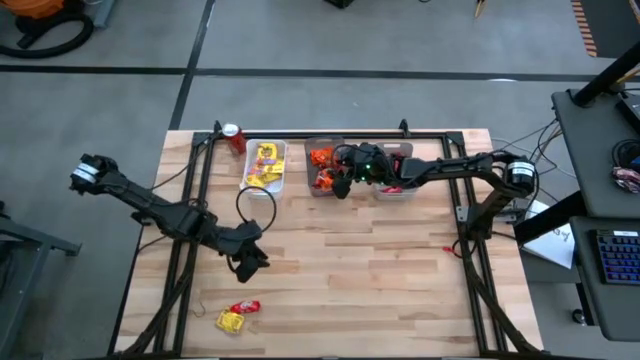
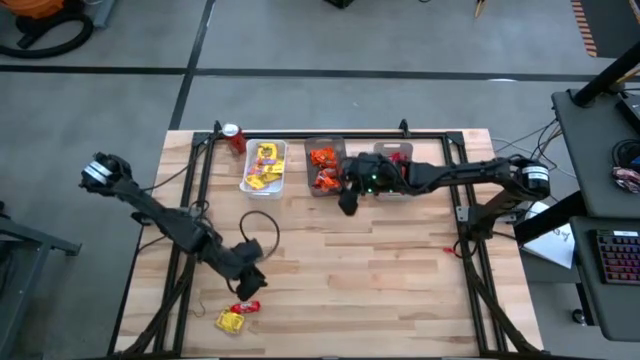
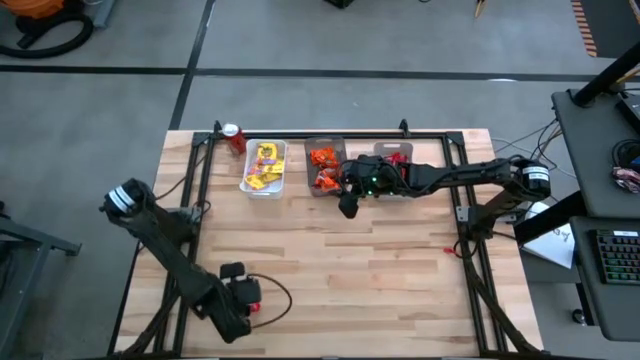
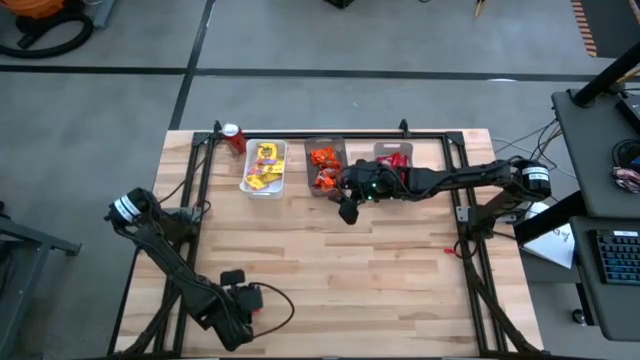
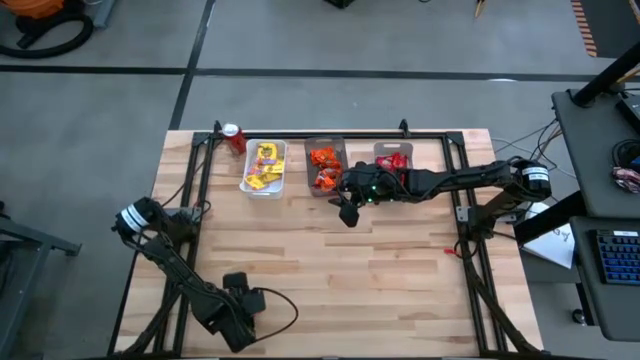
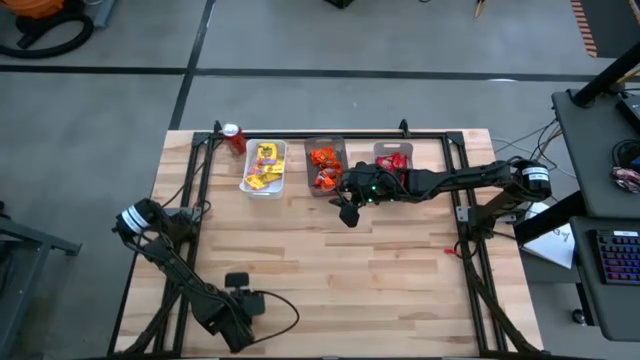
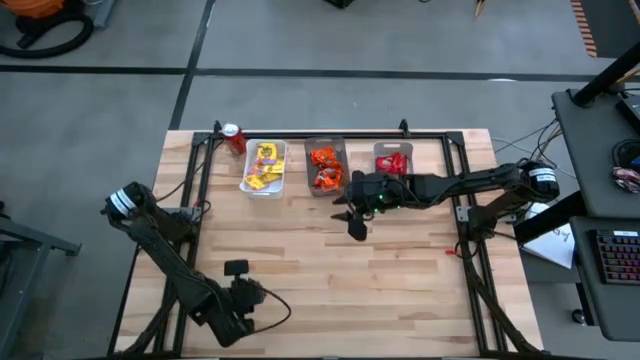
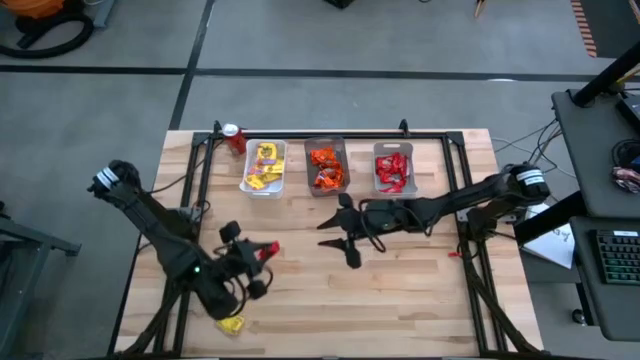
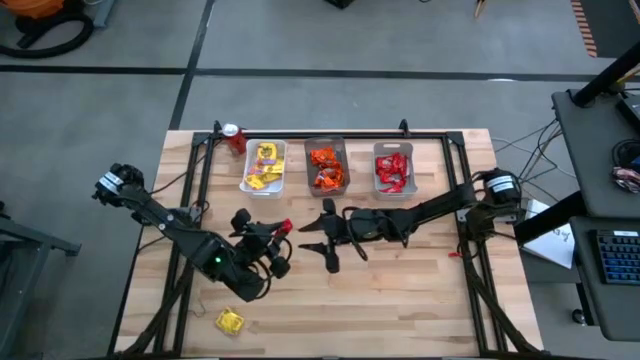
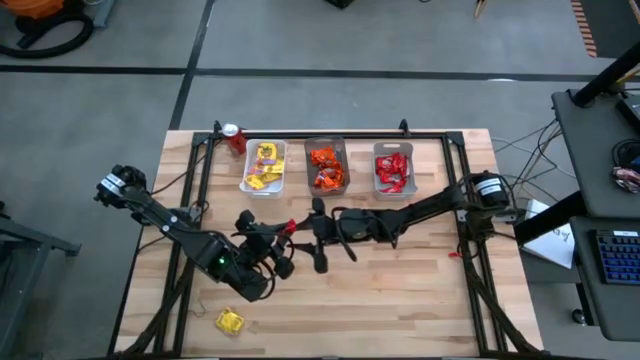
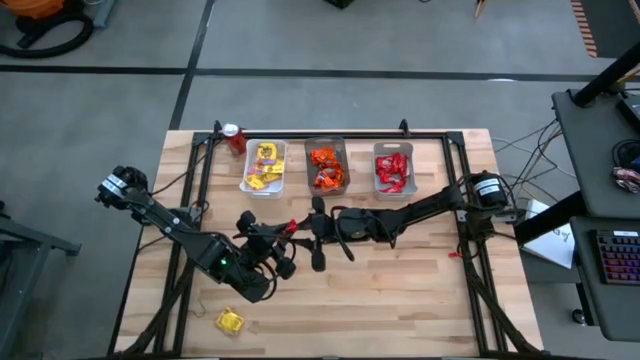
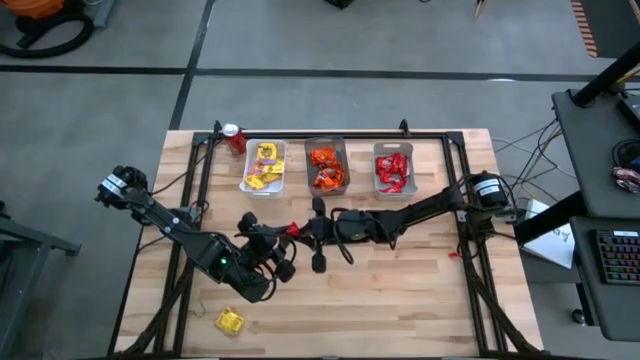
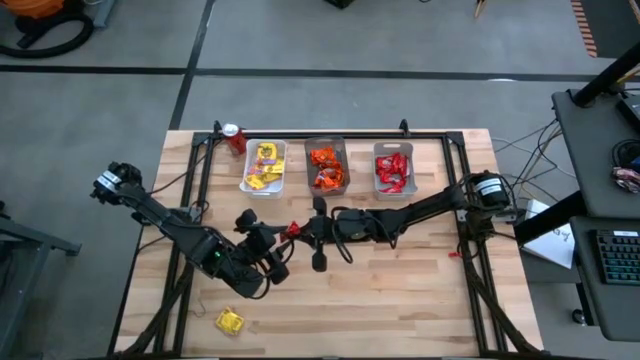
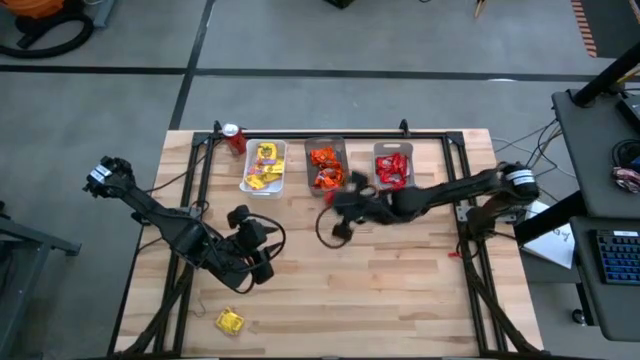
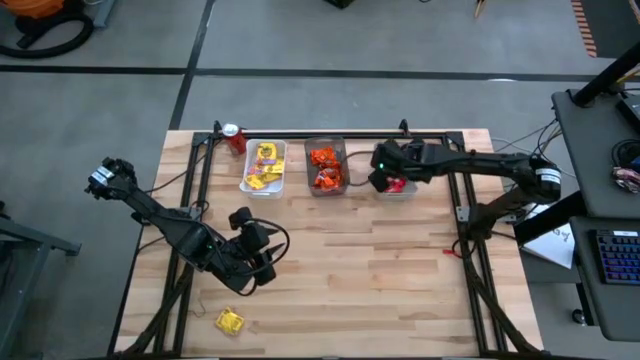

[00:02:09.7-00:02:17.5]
Task: Sort candy
Put the red chocolate into the gray bin

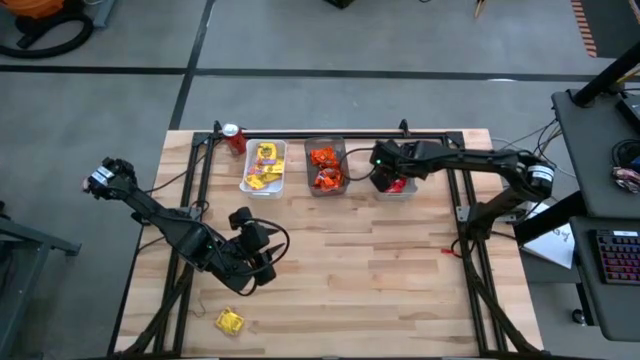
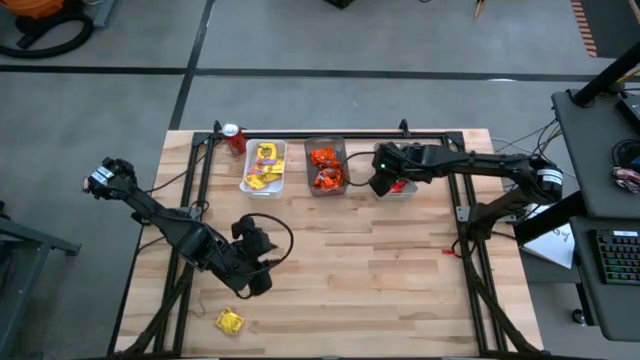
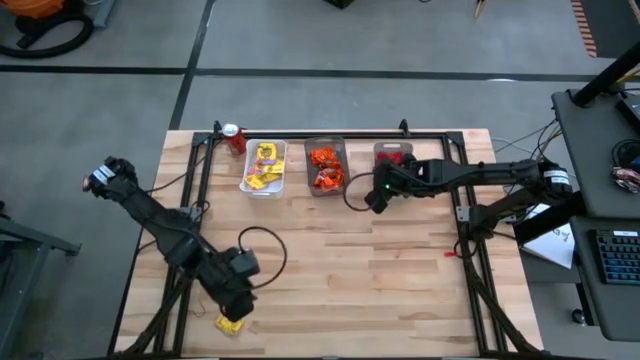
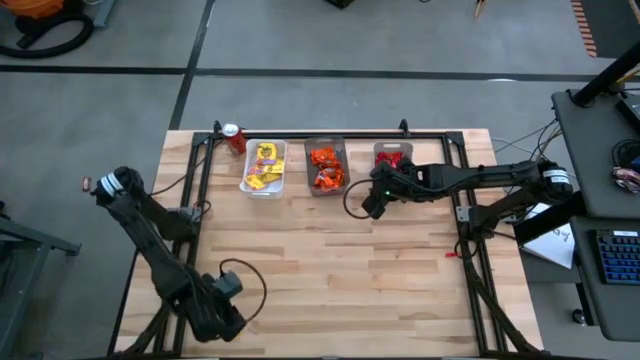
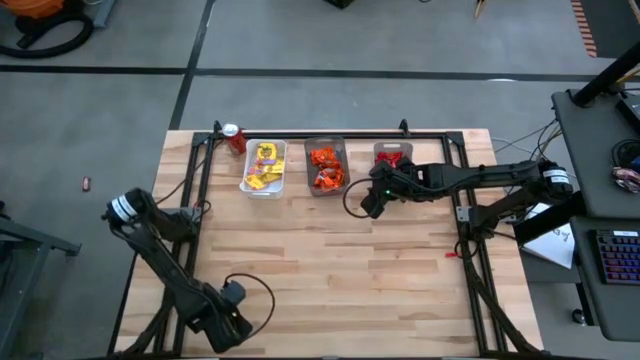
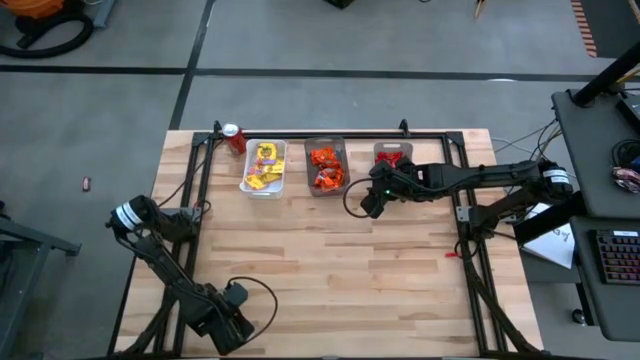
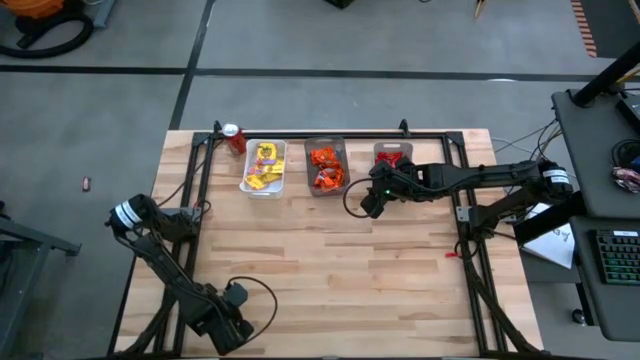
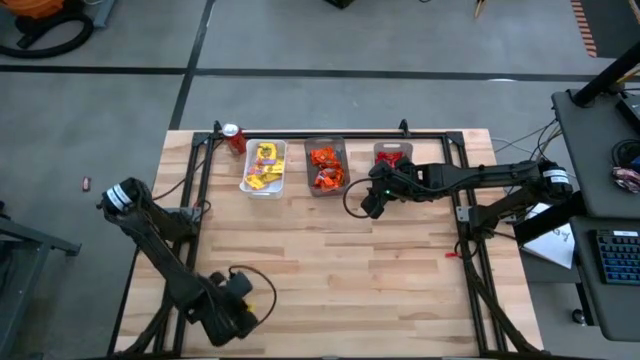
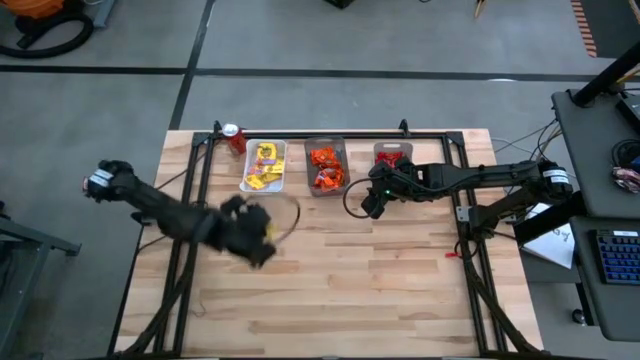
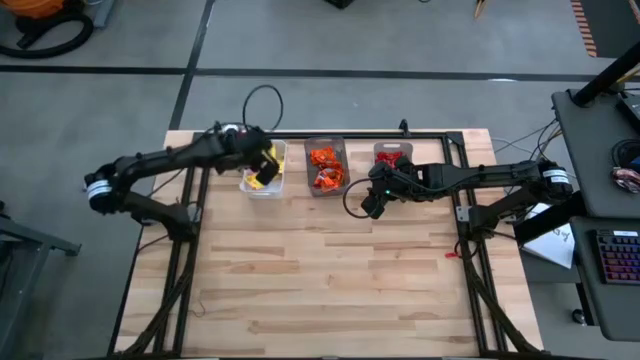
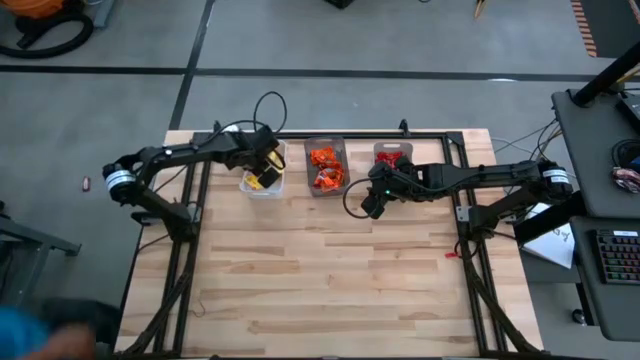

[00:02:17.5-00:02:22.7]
Put the yellow candy into the white bin

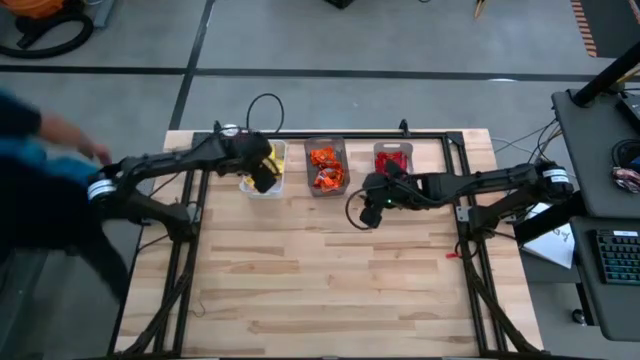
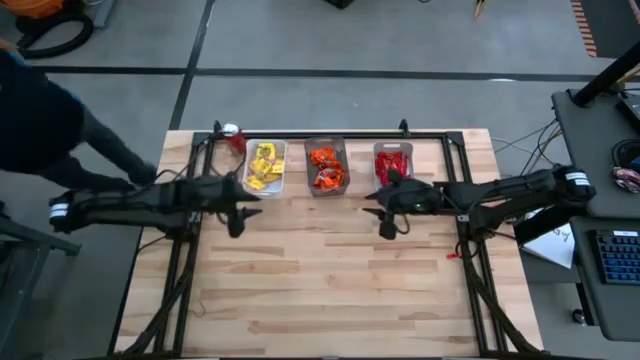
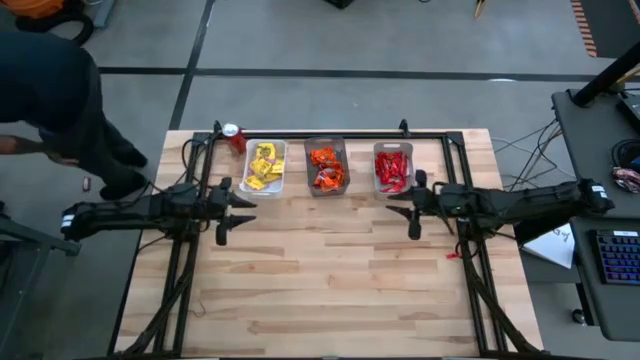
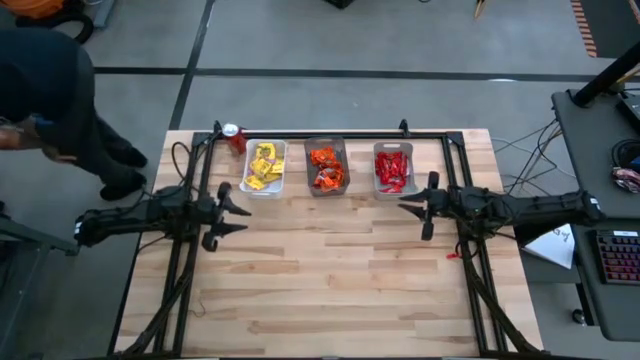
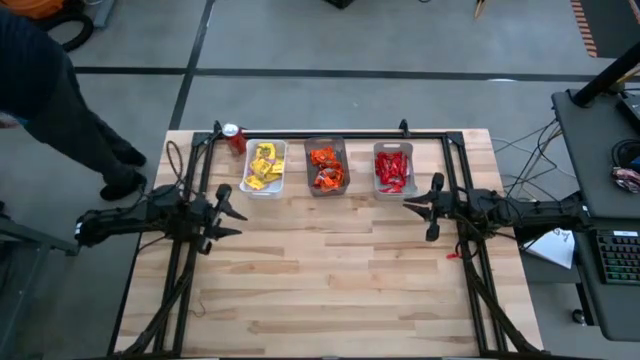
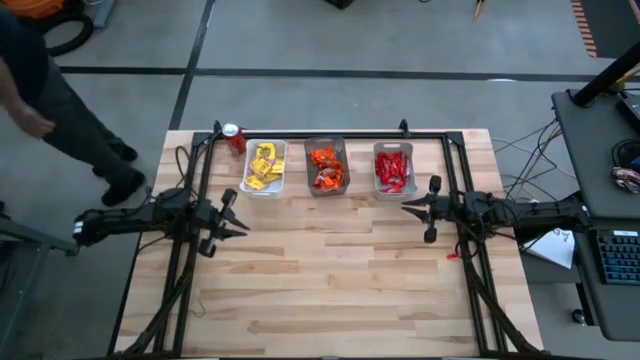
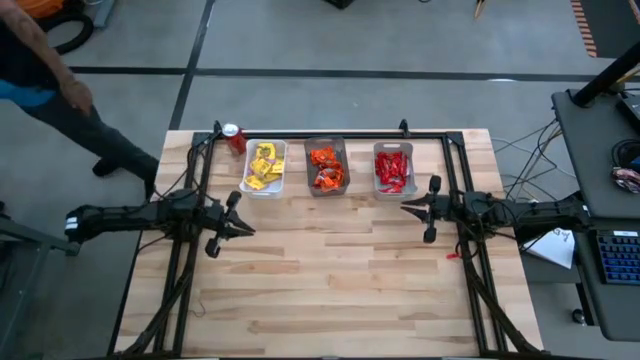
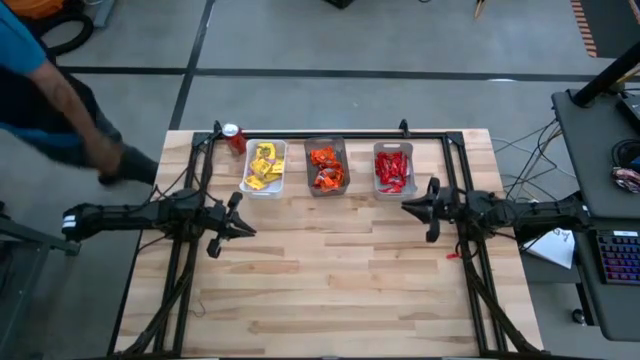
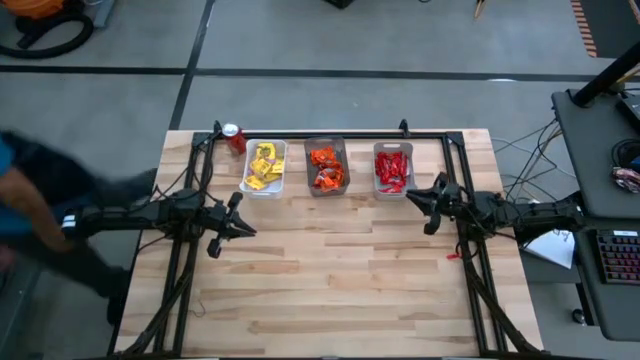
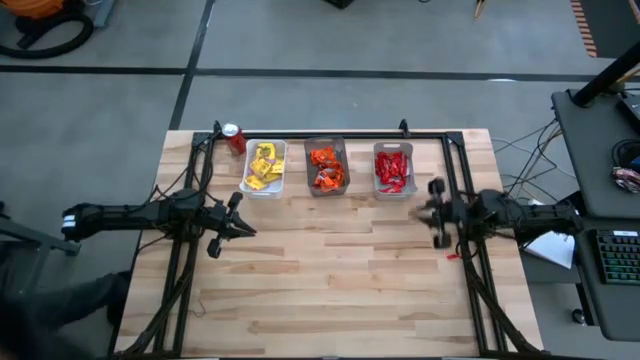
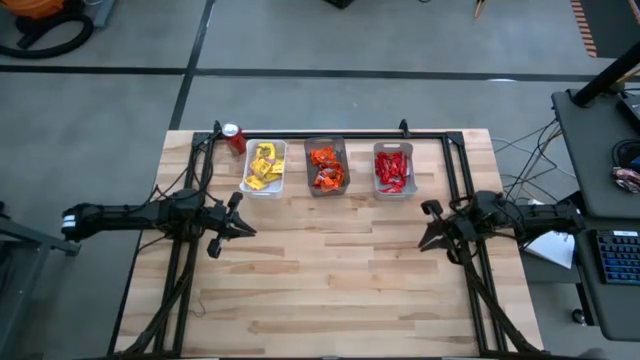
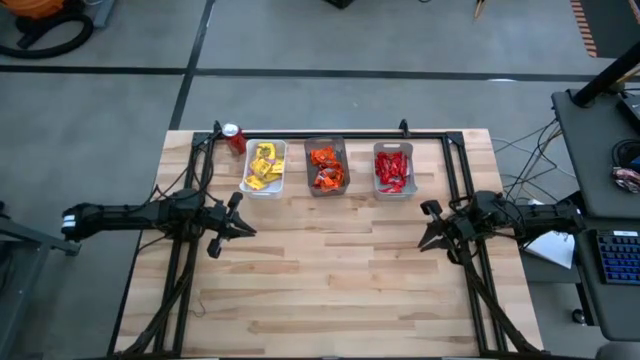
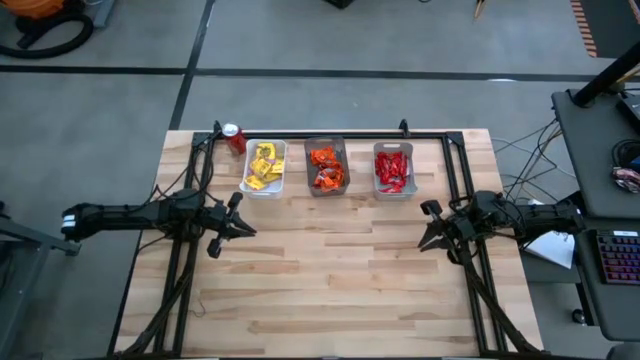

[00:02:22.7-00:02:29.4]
Return to Home Position

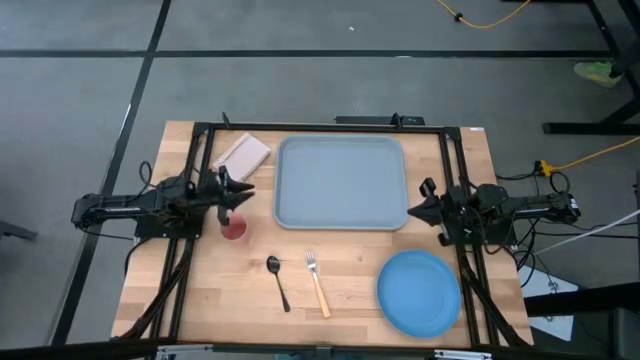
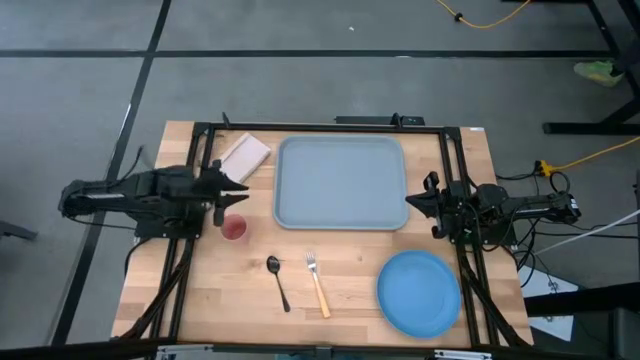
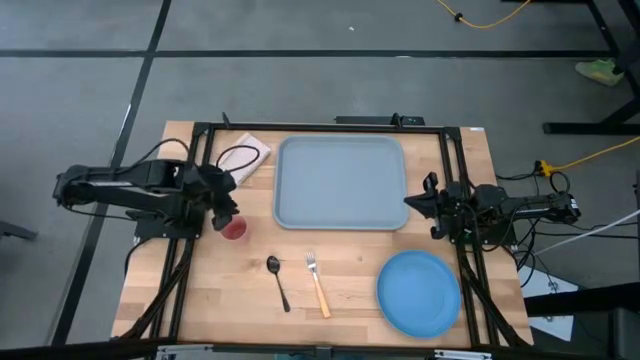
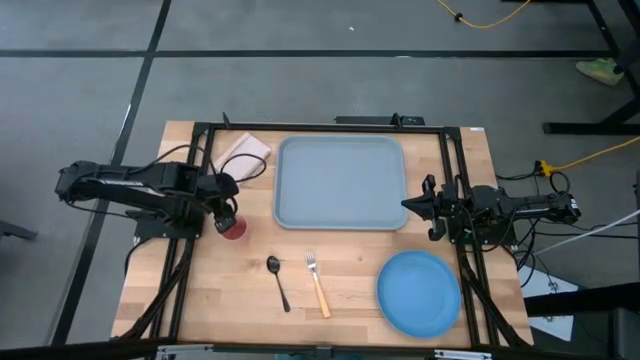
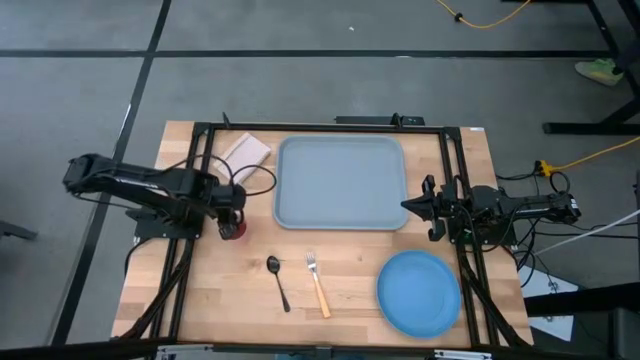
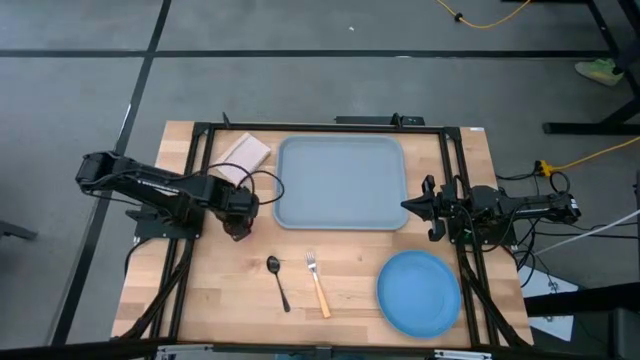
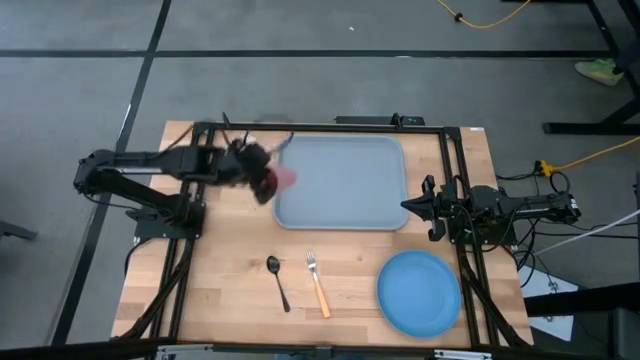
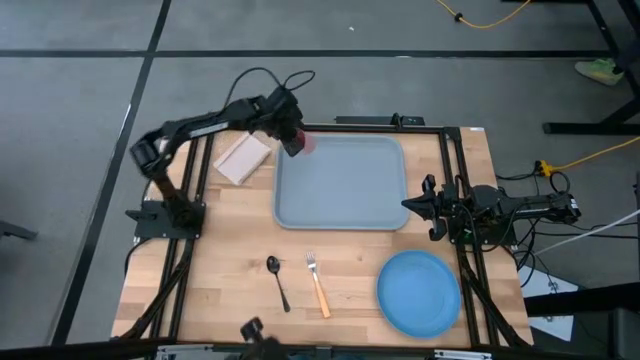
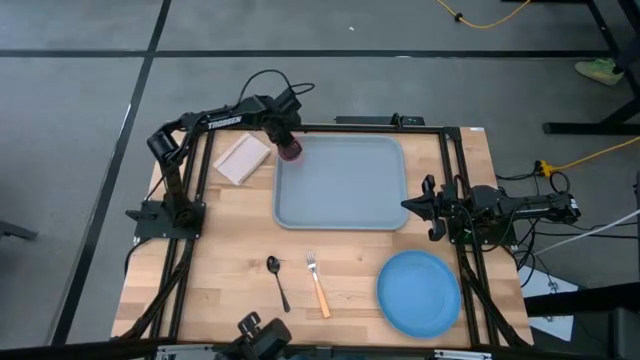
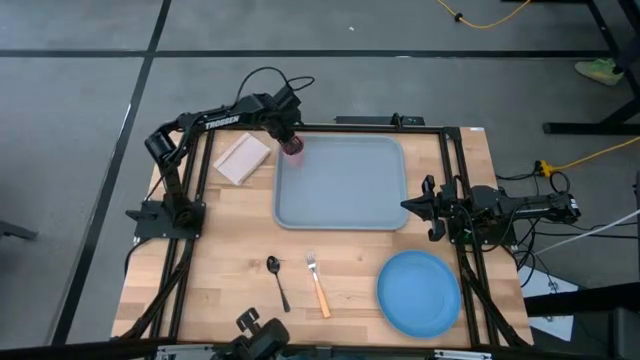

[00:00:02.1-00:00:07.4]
Task: Pick and place plate/cup/fork/spoon on tray
Put the pink cup on the top left of the gray serving tray
